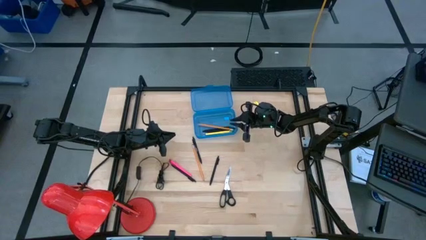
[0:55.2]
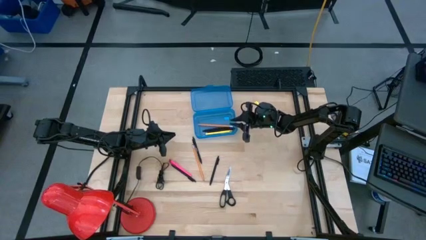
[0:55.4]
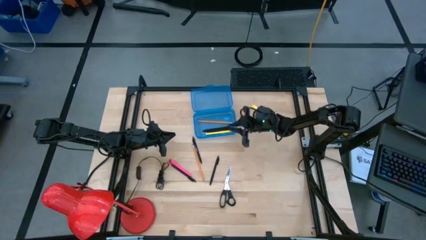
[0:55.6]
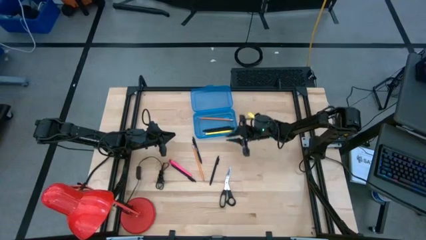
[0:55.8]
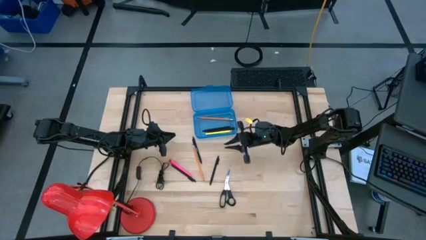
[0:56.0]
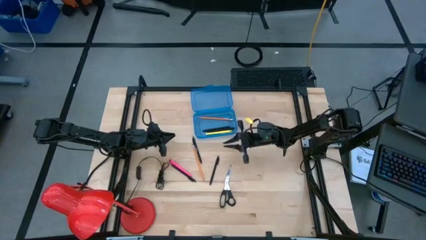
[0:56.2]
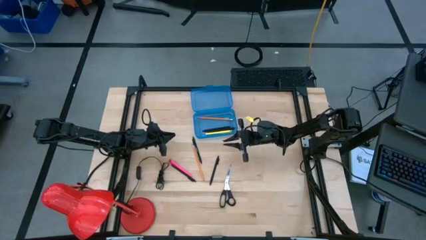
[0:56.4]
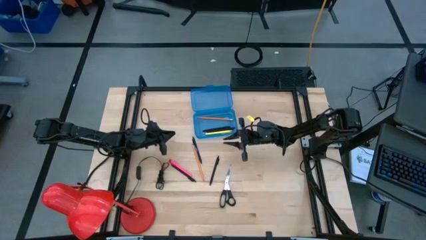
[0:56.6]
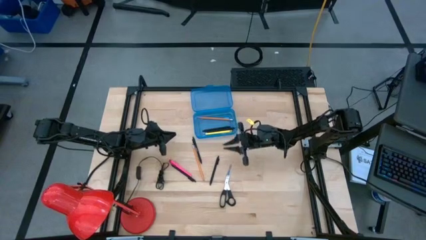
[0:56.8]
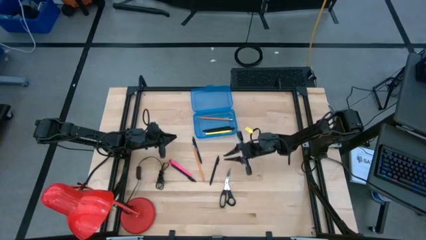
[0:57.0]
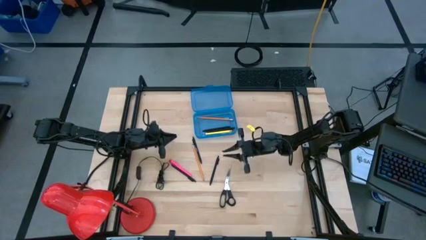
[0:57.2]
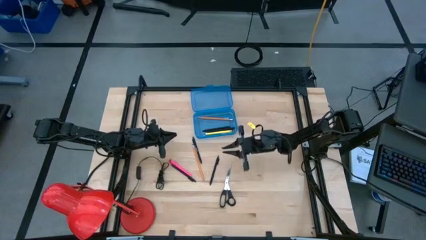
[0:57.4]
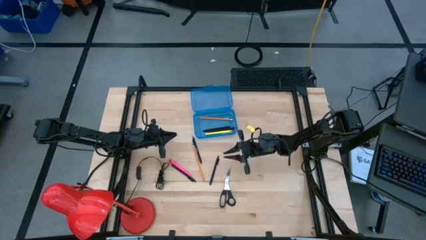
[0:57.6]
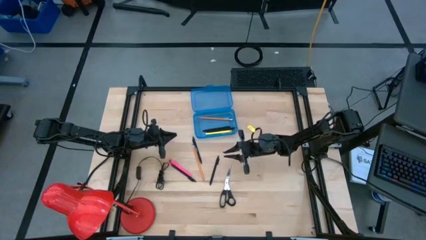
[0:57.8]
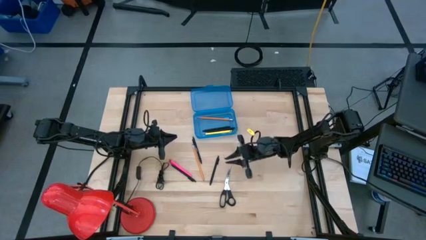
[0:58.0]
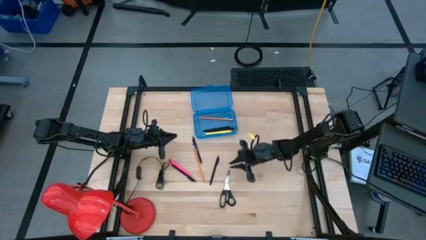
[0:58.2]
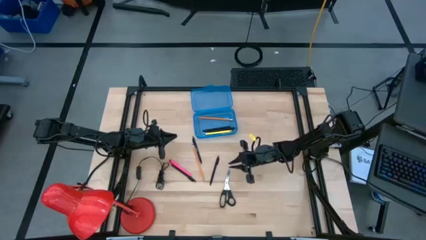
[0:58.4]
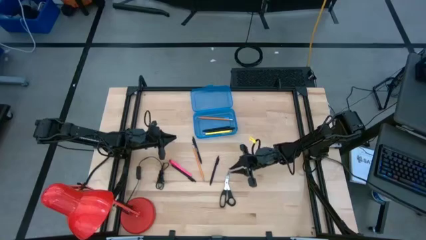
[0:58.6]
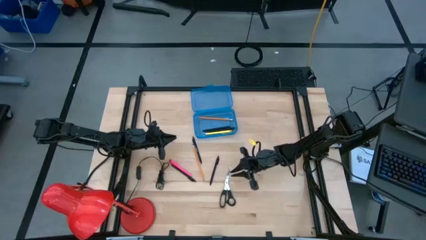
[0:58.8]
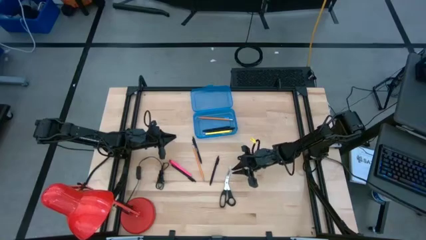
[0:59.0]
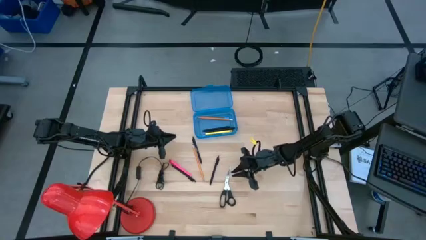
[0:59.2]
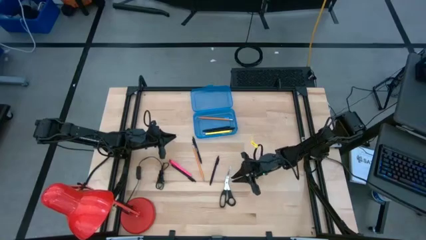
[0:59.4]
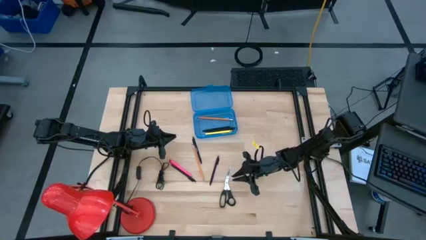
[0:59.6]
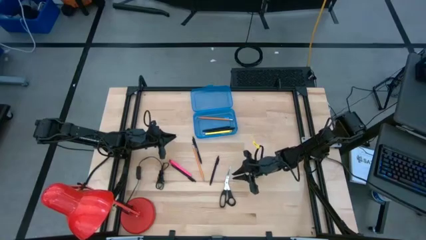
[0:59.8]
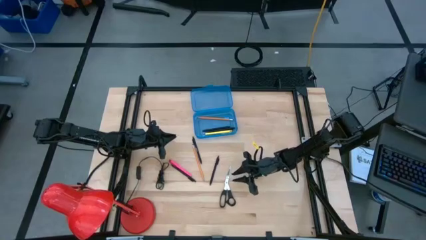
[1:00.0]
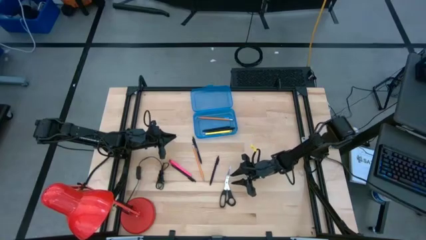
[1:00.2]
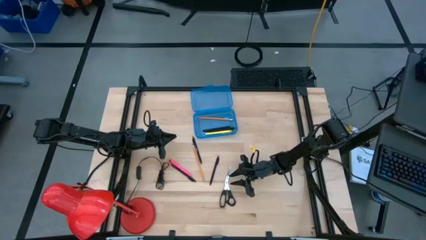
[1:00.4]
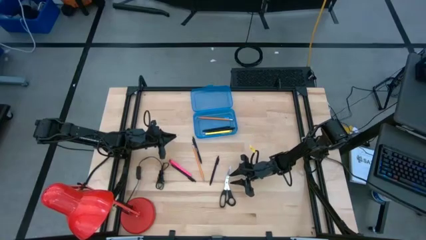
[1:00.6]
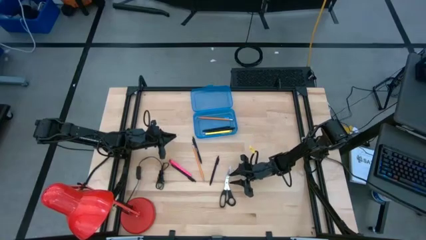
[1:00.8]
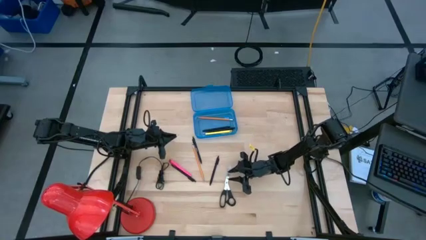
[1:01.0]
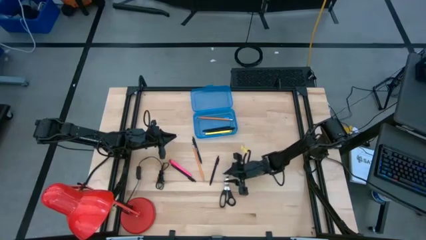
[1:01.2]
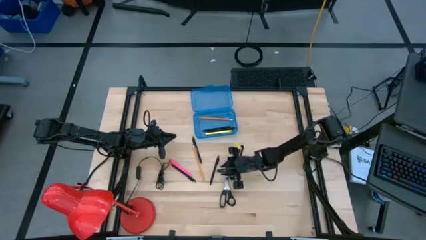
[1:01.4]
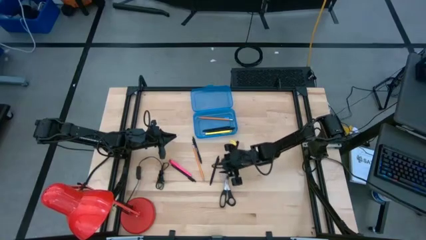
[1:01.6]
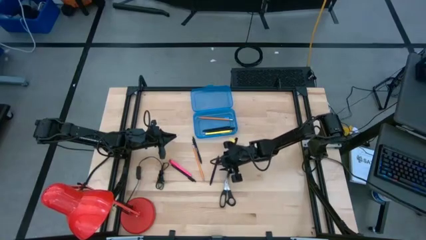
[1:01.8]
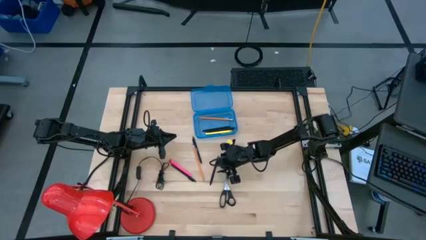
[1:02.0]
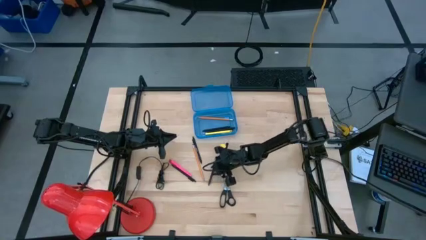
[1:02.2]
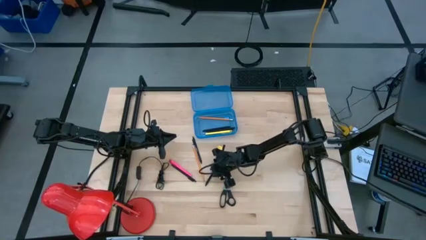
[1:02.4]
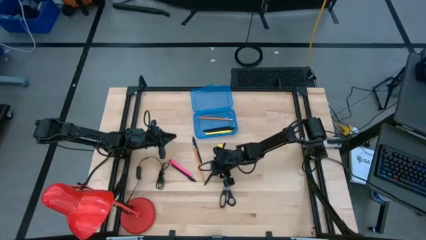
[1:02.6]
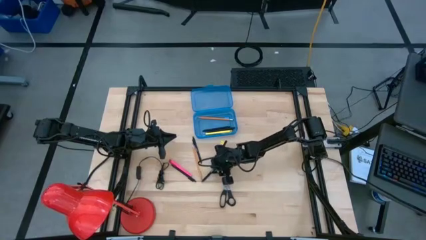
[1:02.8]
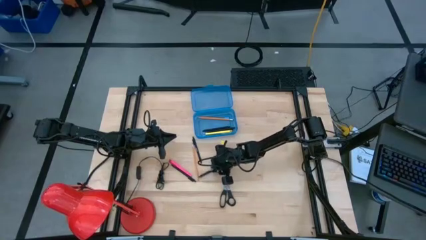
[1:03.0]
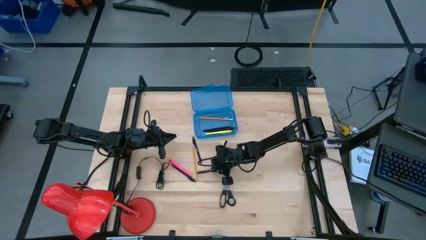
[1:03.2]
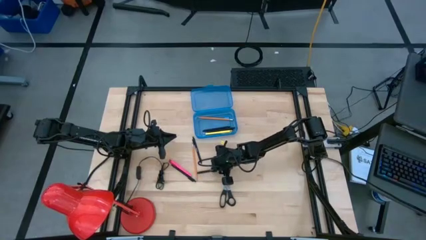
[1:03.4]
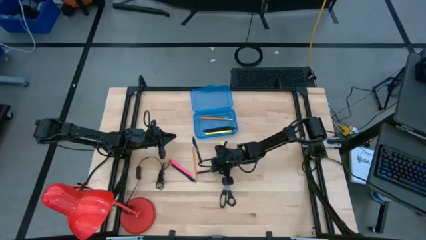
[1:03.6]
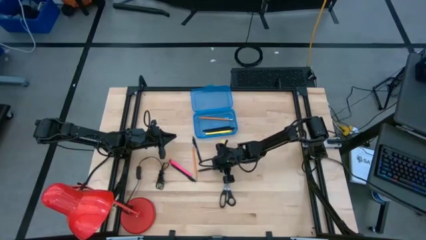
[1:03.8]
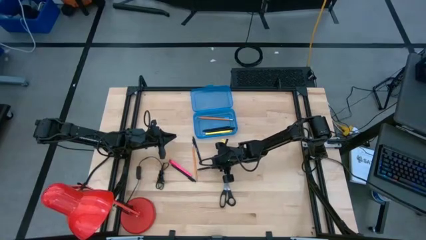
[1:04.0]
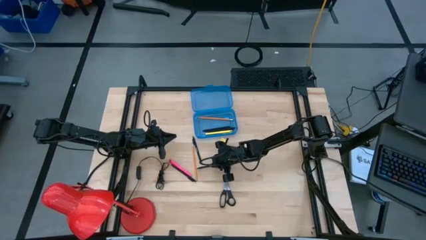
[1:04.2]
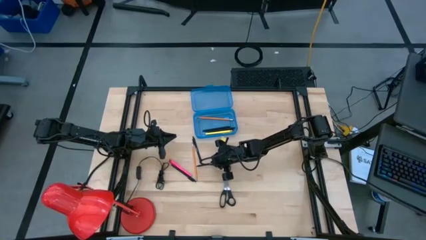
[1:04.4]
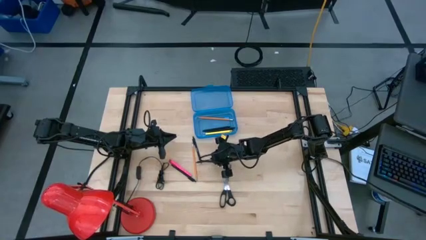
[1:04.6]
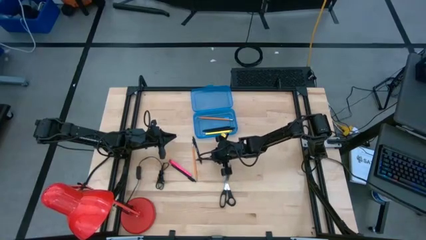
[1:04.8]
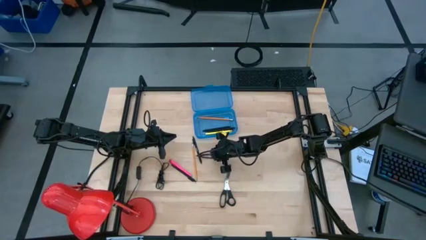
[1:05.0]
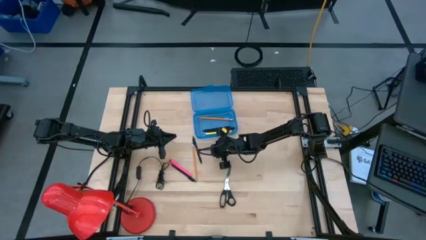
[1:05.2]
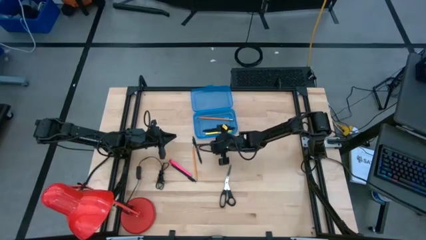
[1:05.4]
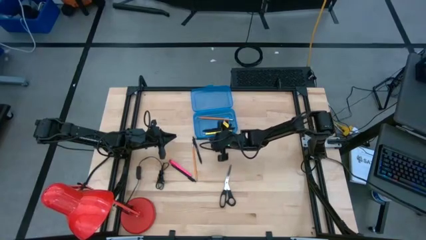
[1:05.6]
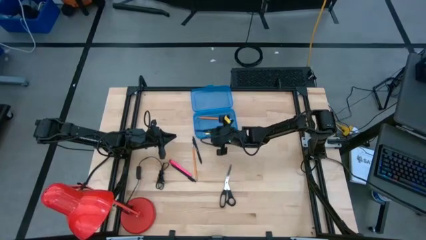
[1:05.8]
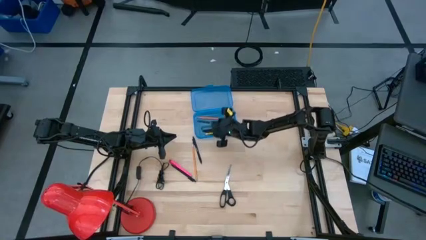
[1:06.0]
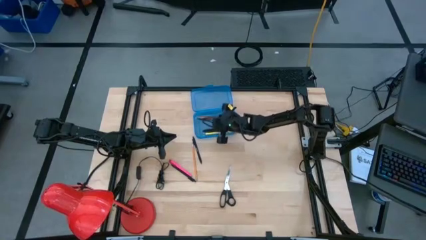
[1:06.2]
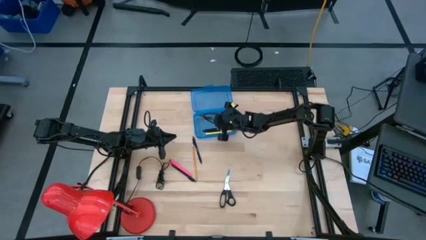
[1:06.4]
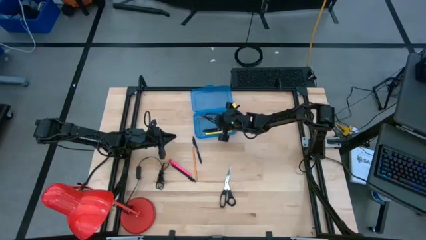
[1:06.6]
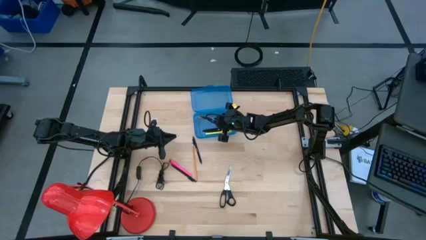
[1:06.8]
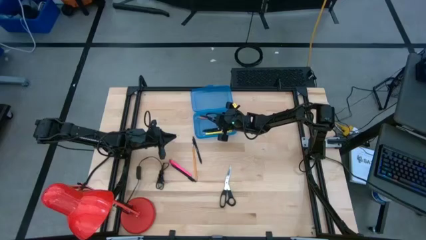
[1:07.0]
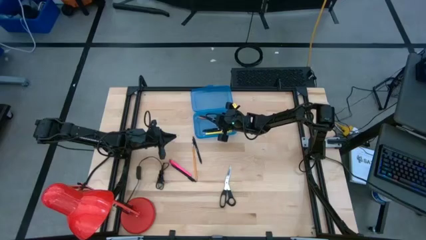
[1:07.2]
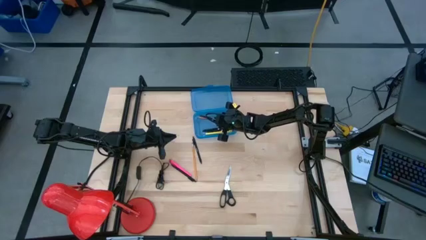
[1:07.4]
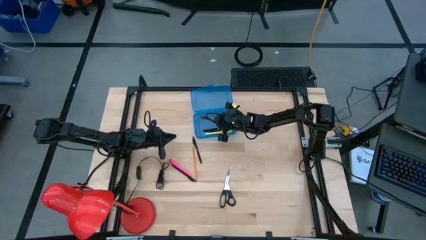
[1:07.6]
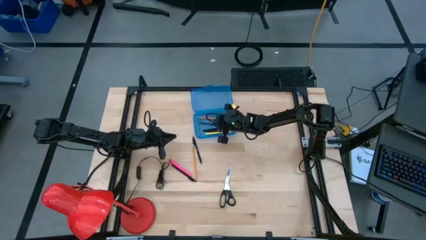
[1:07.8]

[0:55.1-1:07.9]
Task: Pick & place school supplies into a supply box
Put the black pen into the blue supply box

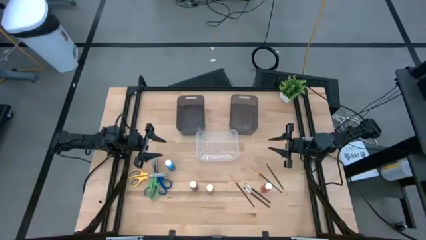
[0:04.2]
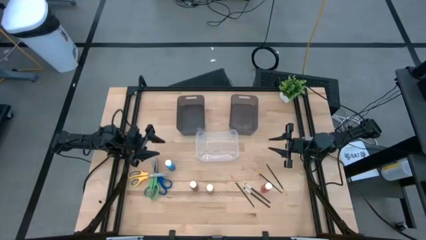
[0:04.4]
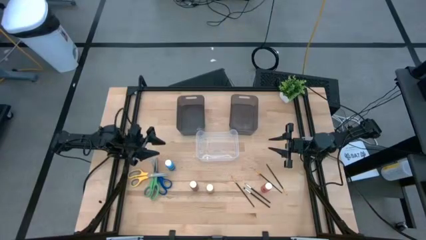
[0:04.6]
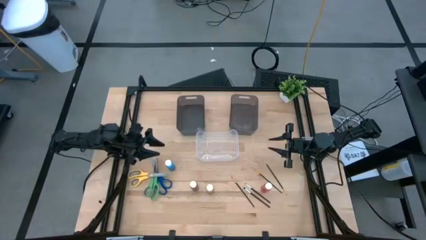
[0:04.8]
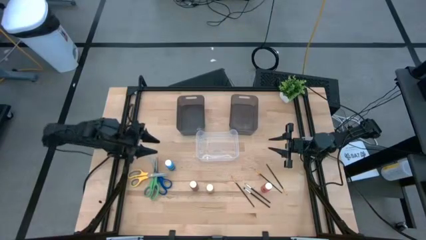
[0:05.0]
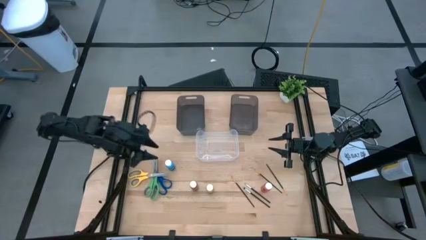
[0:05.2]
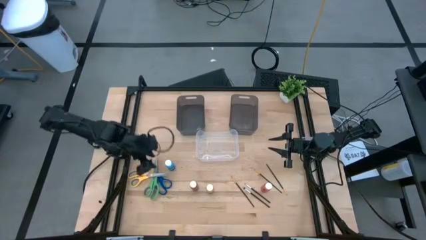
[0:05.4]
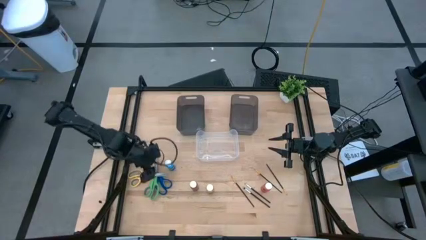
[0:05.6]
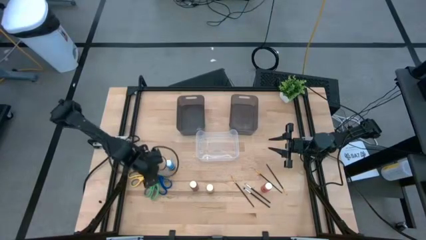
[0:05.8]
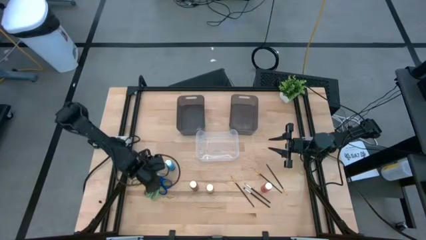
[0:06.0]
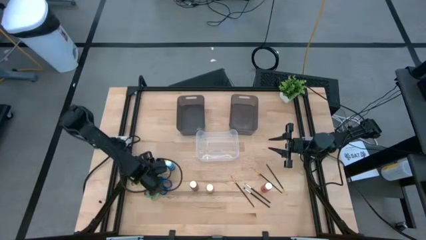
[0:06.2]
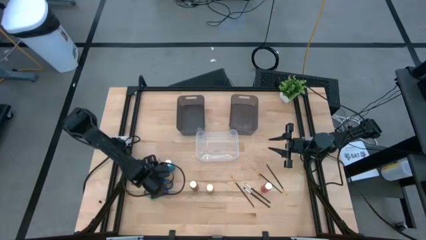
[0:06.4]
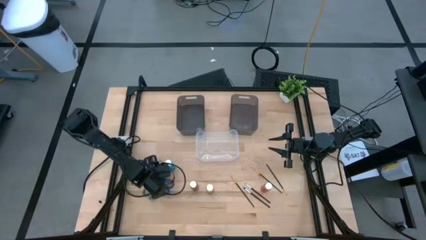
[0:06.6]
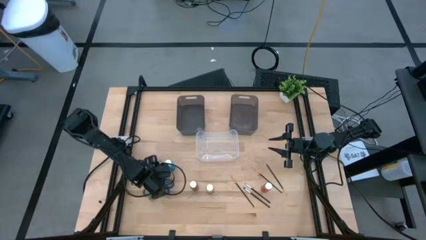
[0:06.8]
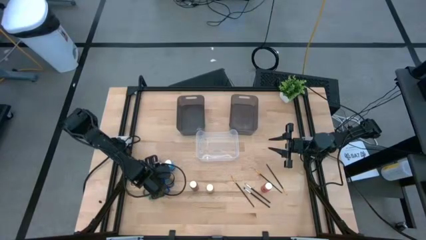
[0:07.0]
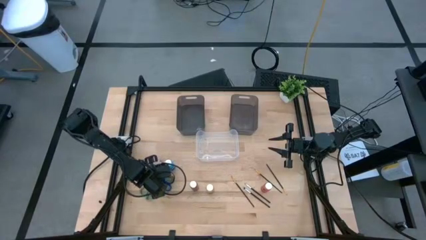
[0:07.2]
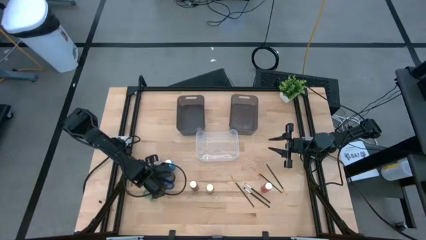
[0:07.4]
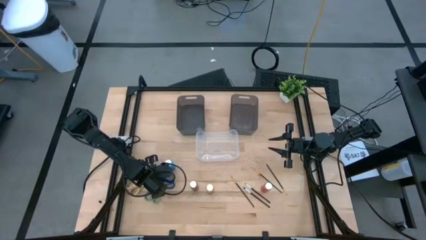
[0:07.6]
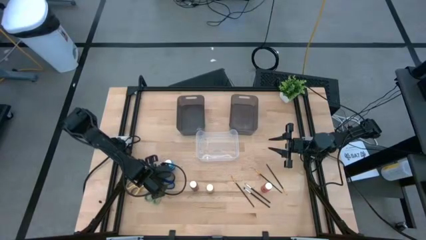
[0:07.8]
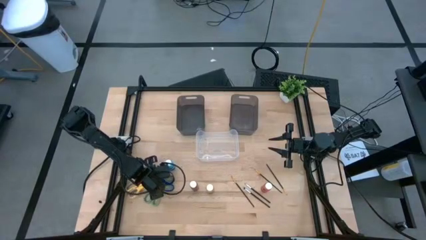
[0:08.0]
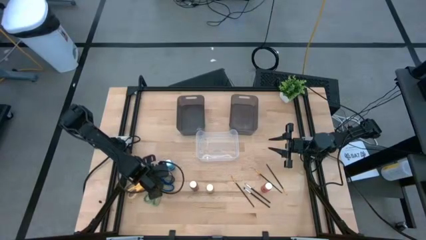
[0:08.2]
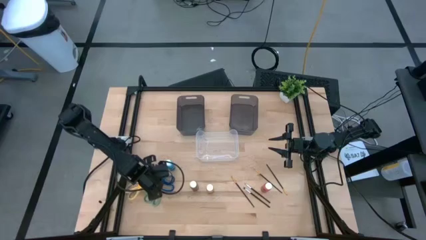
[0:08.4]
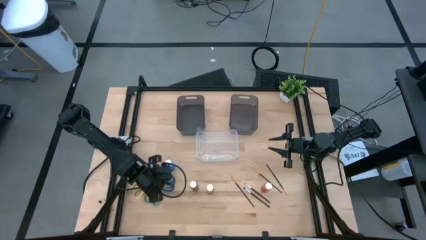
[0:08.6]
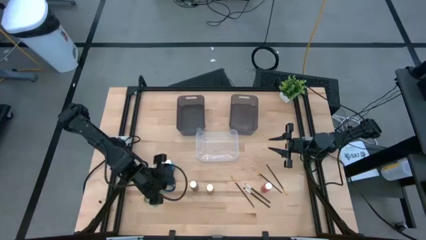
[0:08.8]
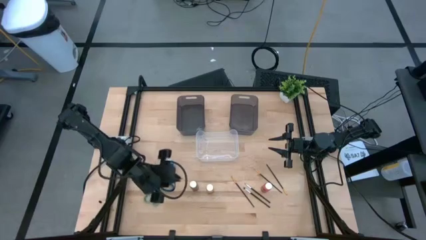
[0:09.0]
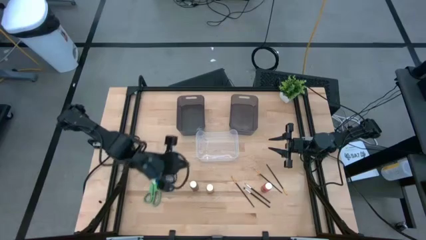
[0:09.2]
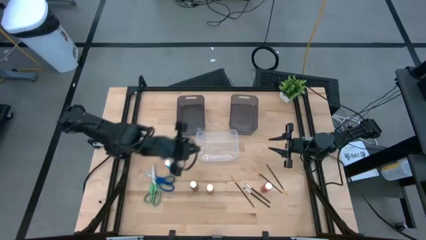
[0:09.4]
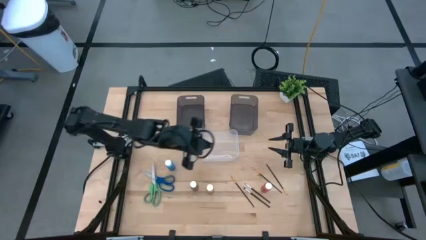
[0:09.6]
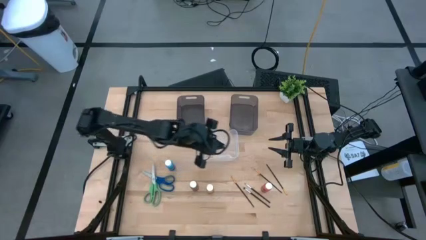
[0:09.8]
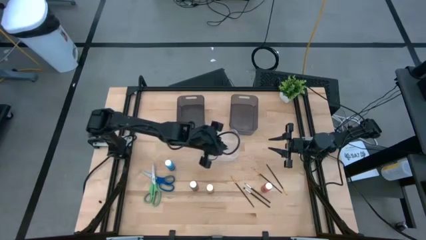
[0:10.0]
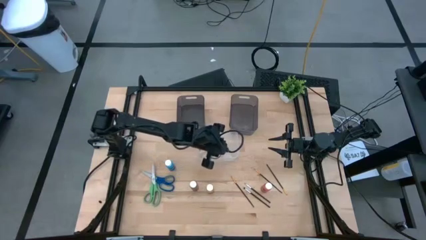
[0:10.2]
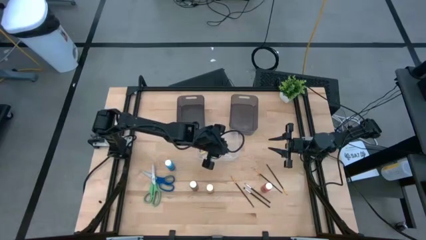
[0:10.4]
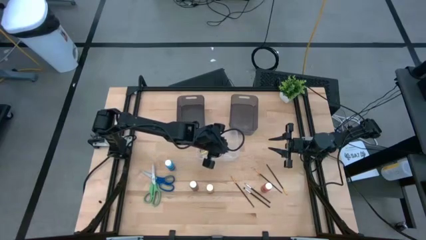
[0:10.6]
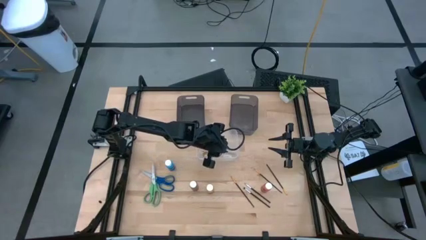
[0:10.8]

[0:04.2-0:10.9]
Task: Pick & Place Paint Supplies
Put the yellow scissors into the transparent bin
